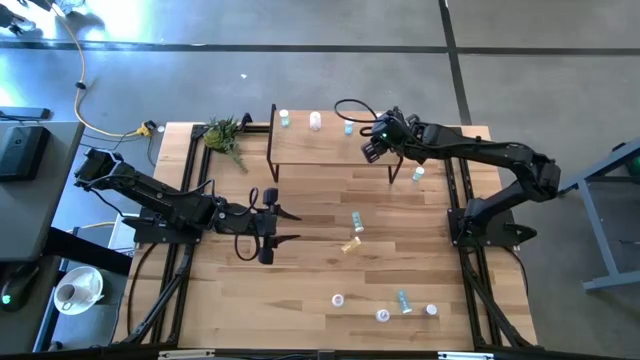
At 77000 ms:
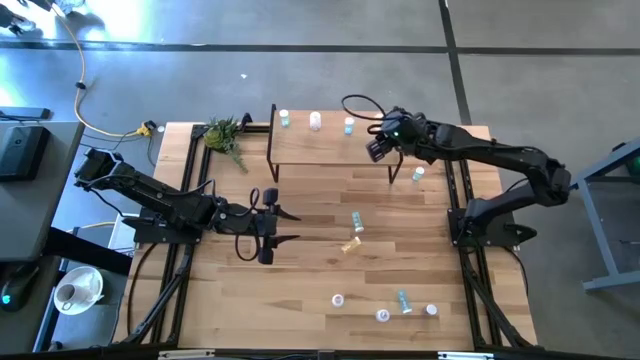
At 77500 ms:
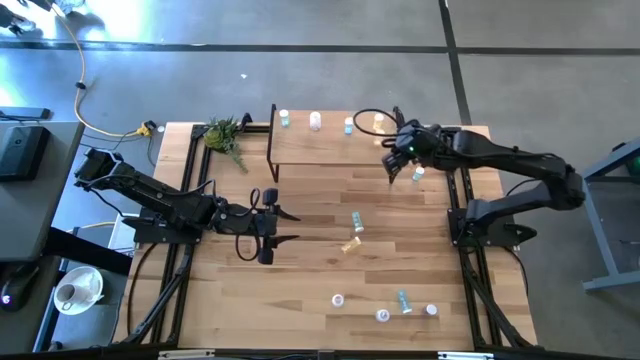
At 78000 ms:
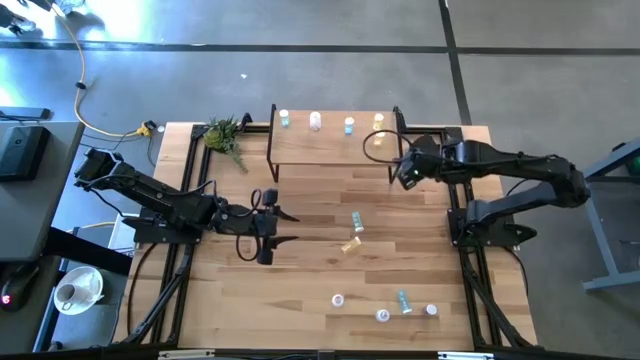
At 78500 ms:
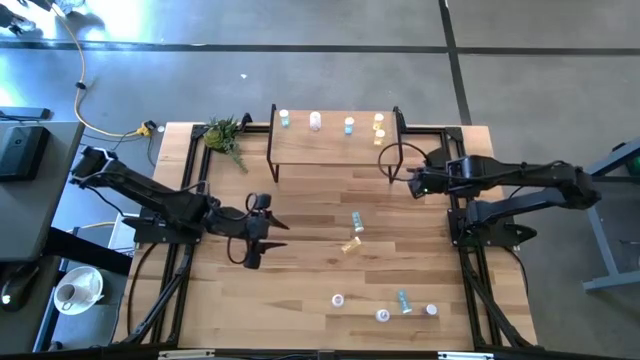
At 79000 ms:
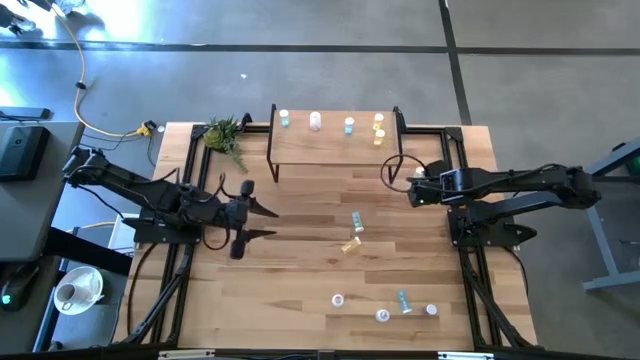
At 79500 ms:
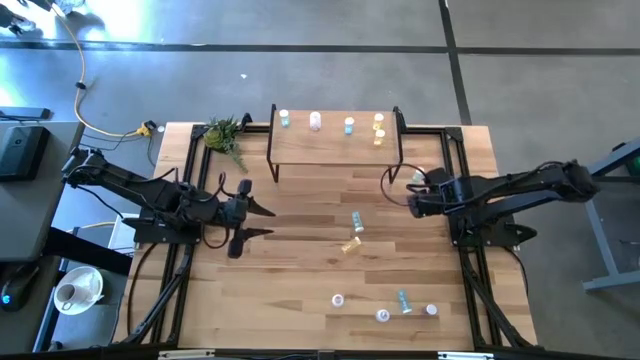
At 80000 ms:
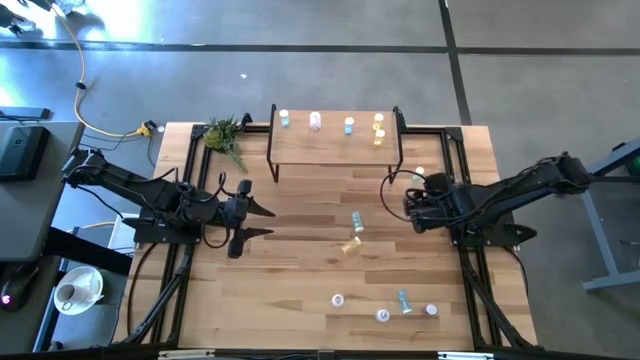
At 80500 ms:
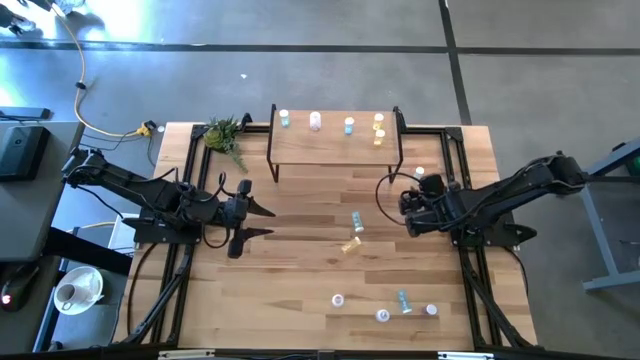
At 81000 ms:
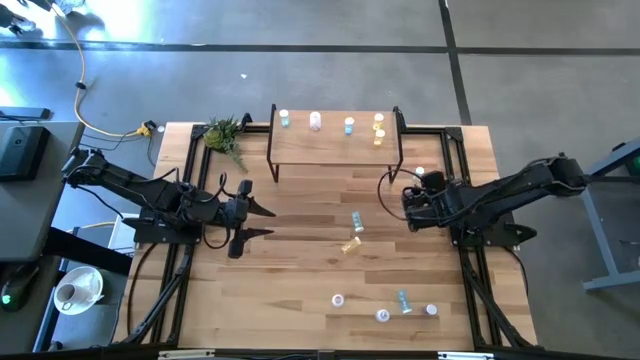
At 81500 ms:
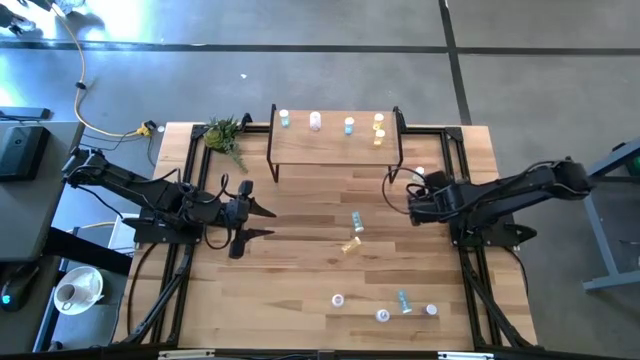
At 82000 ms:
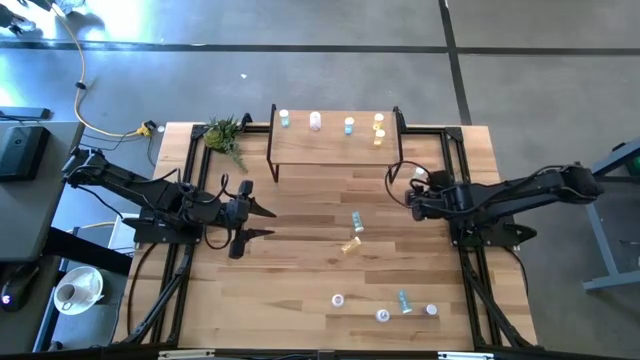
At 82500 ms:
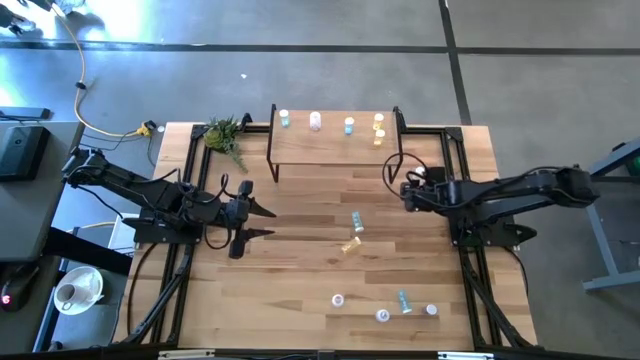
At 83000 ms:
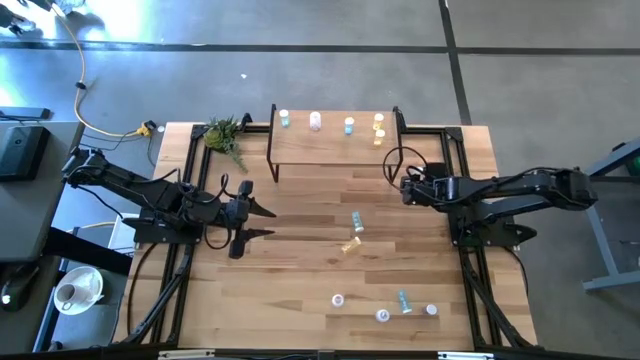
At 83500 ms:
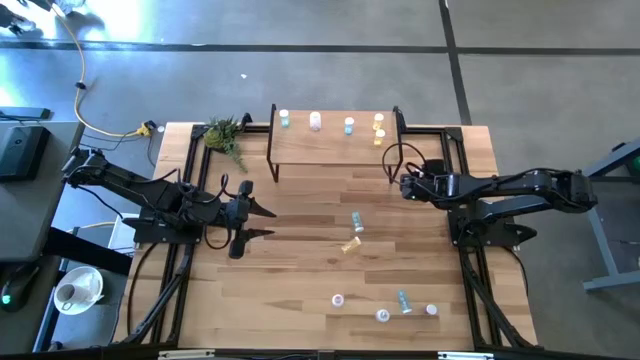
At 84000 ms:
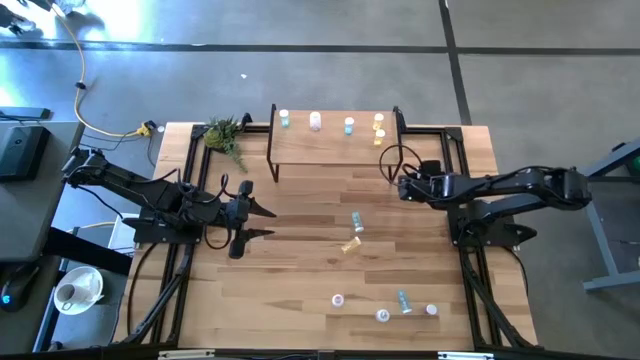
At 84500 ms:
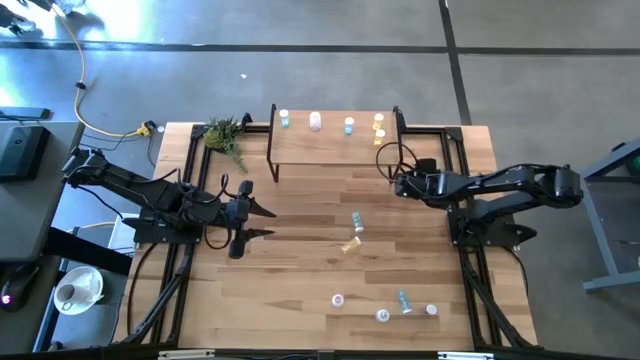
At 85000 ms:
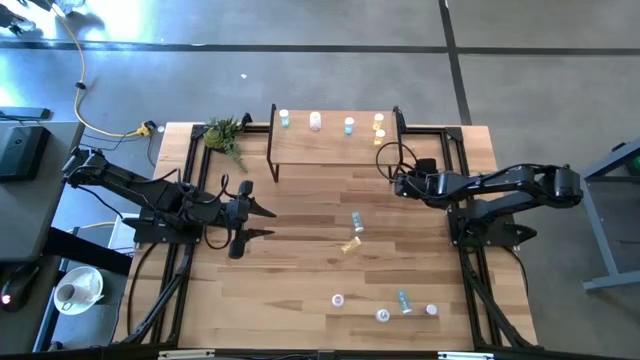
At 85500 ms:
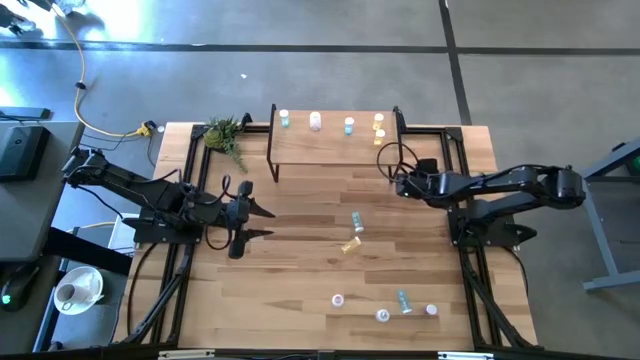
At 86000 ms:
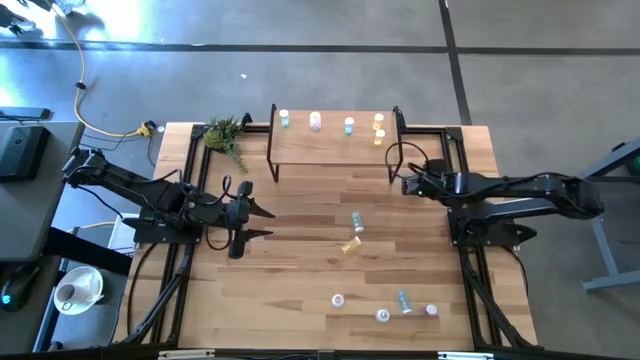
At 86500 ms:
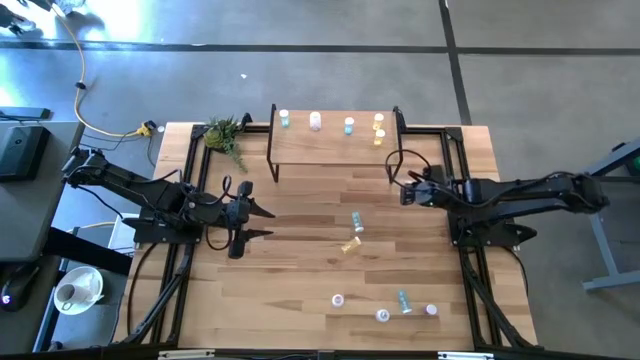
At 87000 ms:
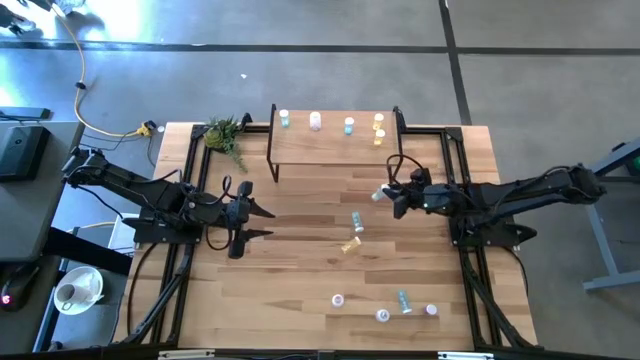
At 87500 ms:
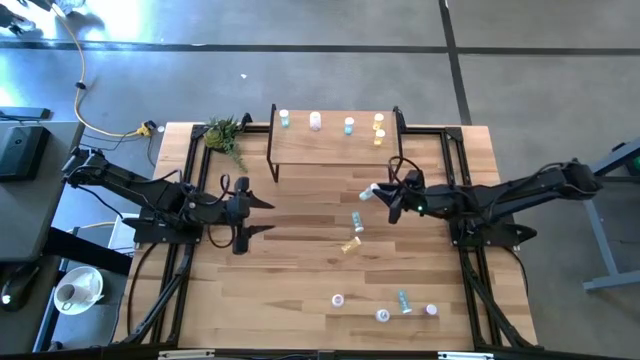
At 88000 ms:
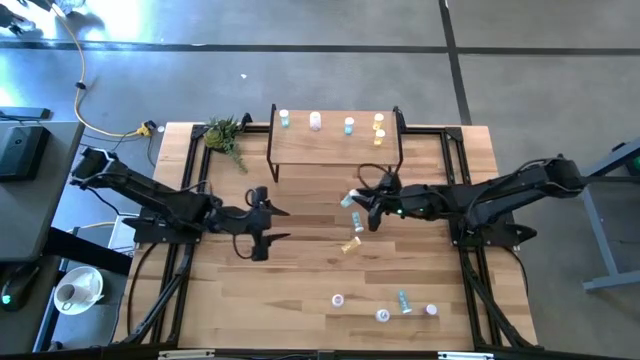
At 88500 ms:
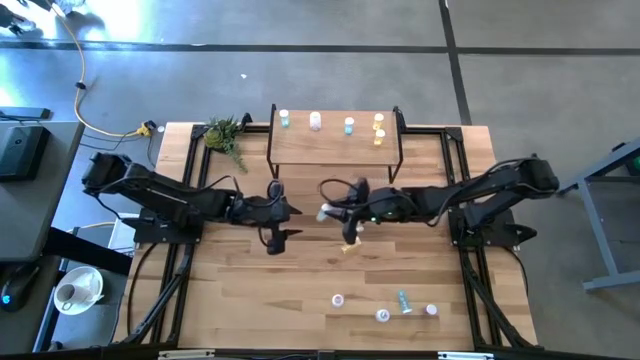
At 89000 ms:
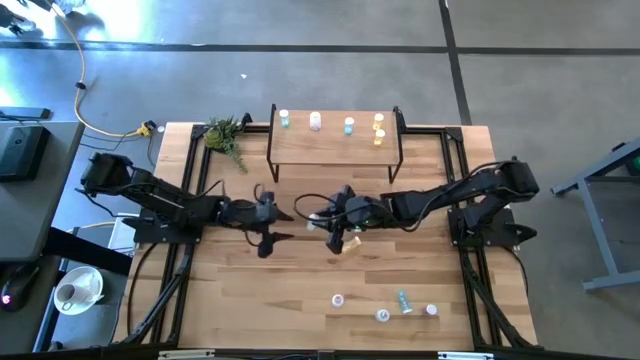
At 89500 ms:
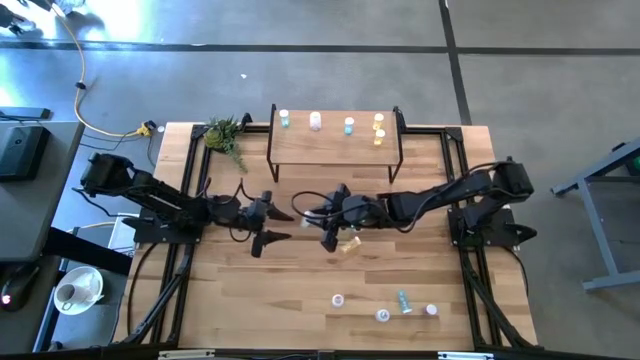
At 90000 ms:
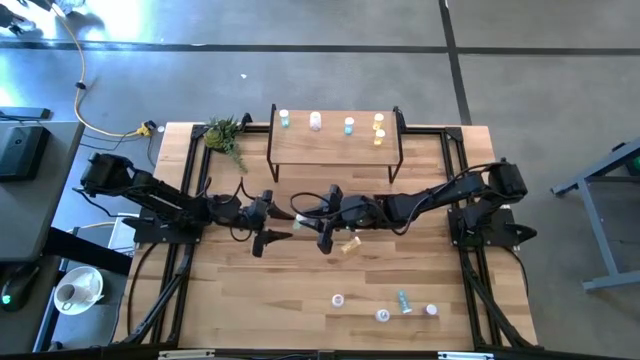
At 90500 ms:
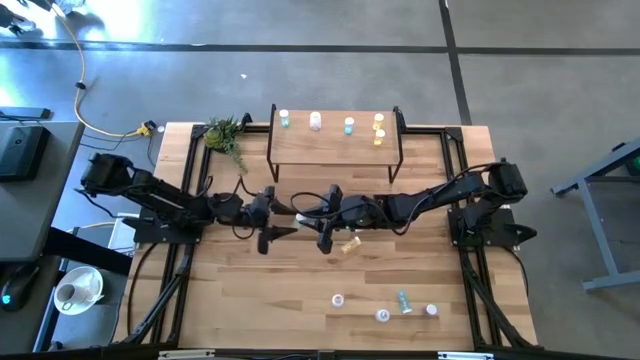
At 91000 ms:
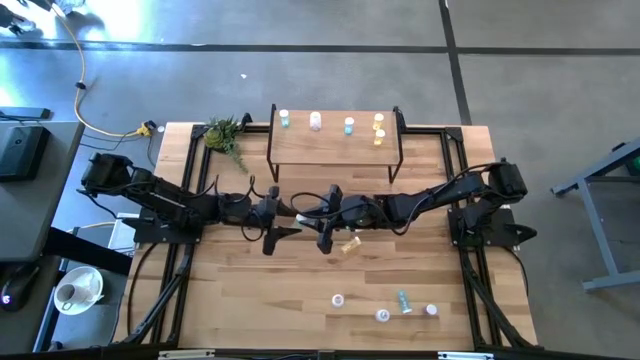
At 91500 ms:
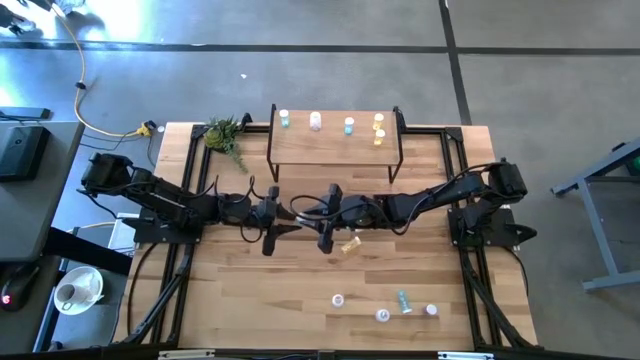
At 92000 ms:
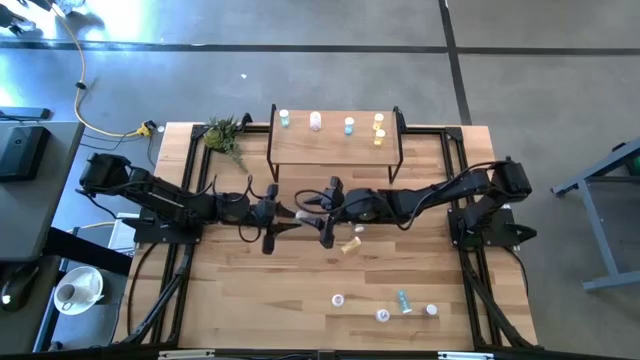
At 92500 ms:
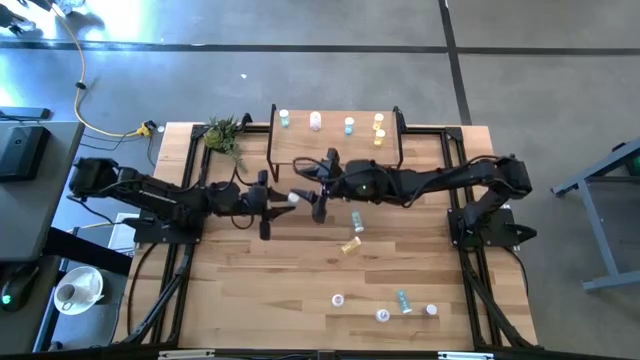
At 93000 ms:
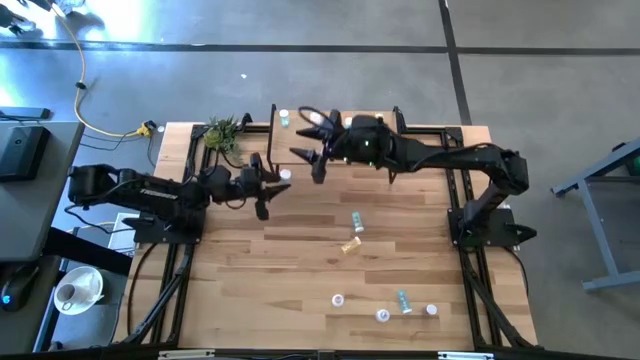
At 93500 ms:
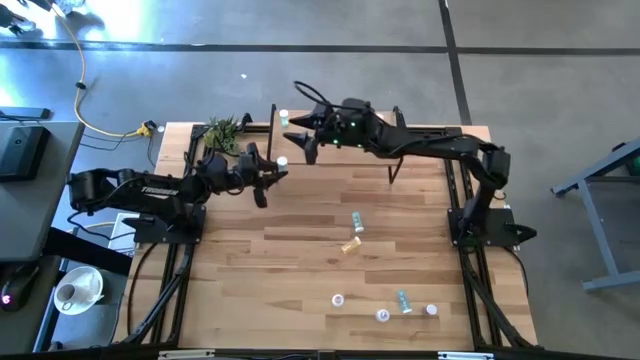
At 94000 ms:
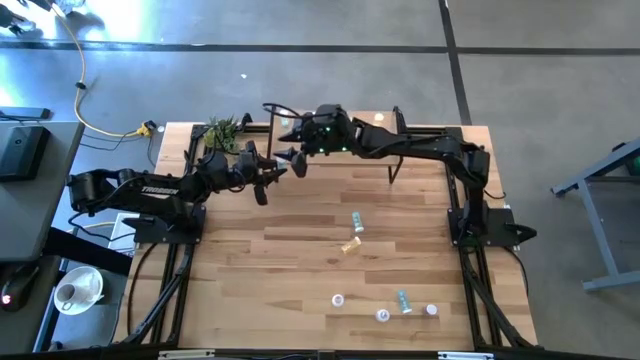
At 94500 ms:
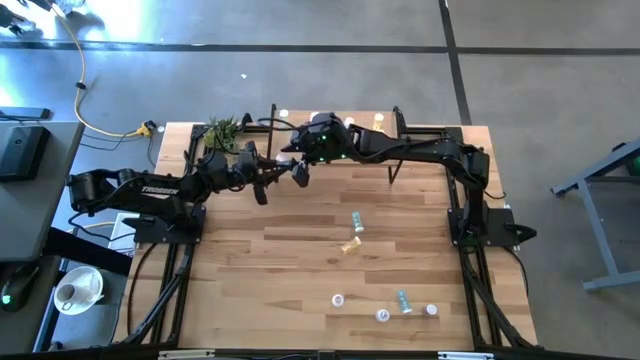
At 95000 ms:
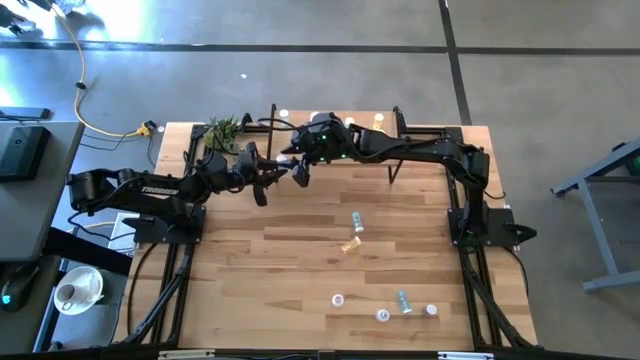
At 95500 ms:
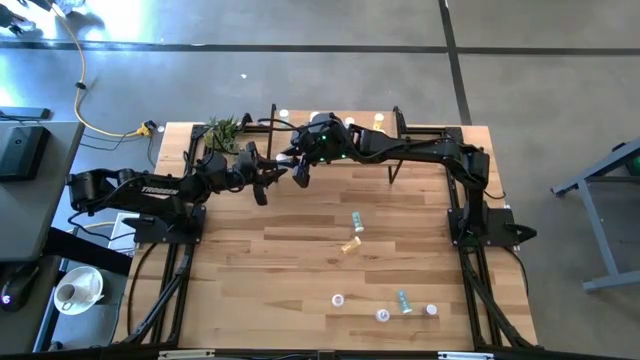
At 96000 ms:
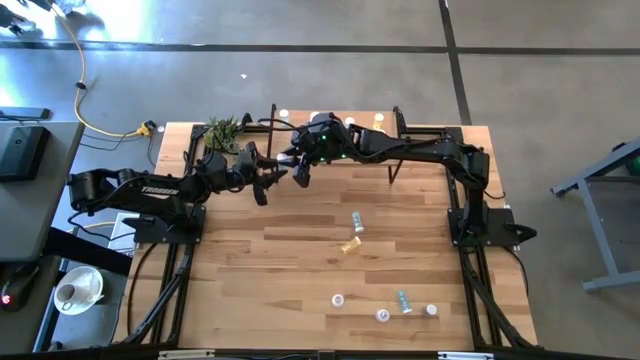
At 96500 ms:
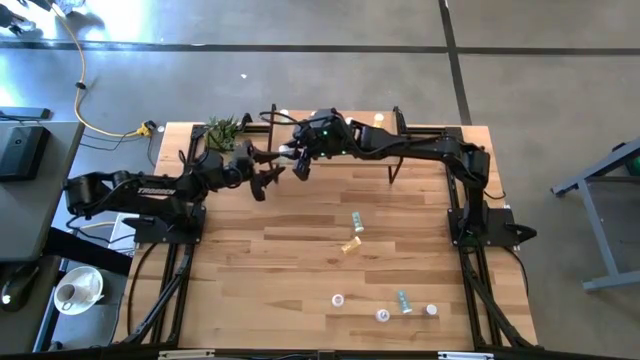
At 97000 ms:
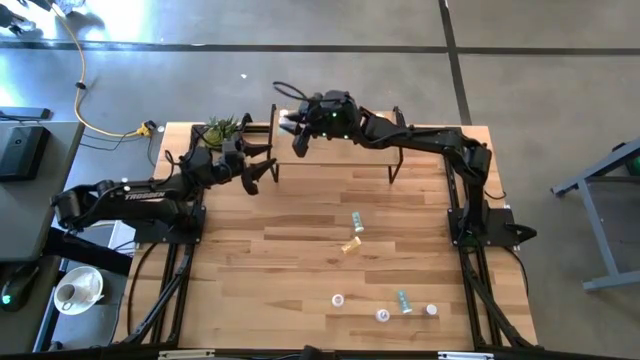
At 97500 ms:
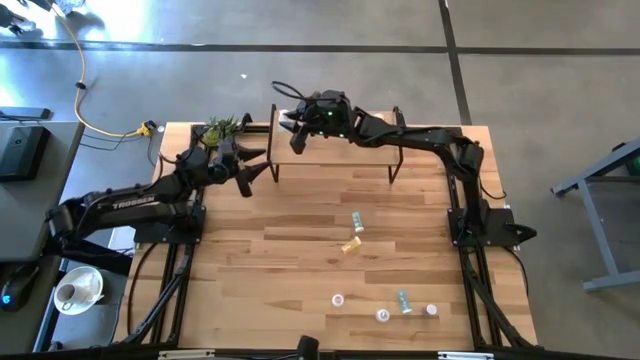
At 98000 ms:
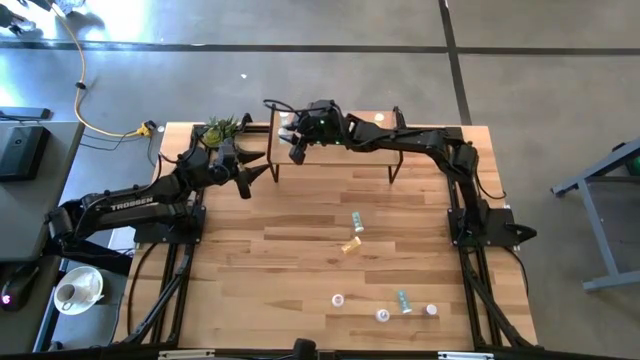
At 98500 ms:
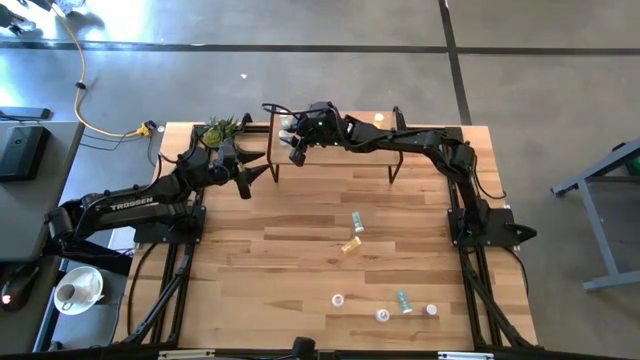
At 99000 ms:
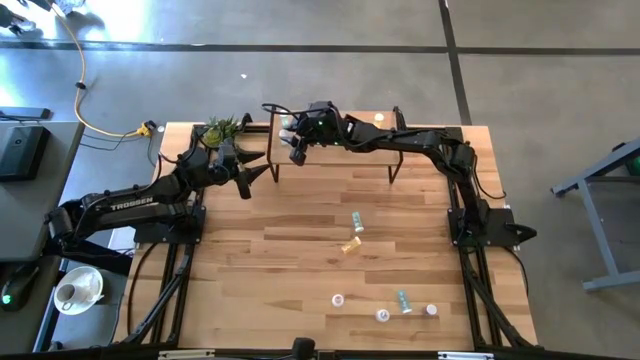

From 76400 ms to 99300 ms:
Task: Pick and place medicine bottles onto shelf by color
Put the top green pill bottle on the shelf aligned with the other green pill bottle
